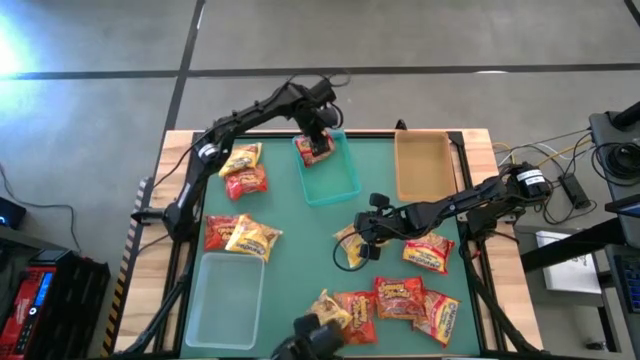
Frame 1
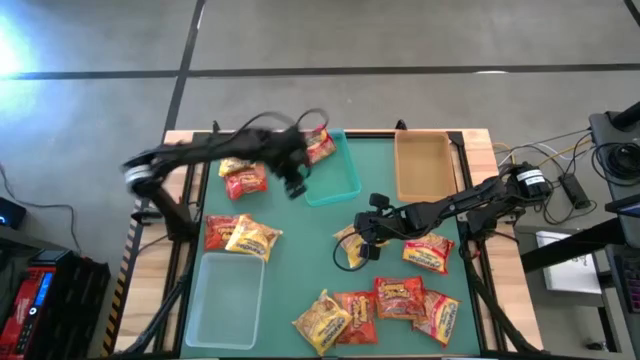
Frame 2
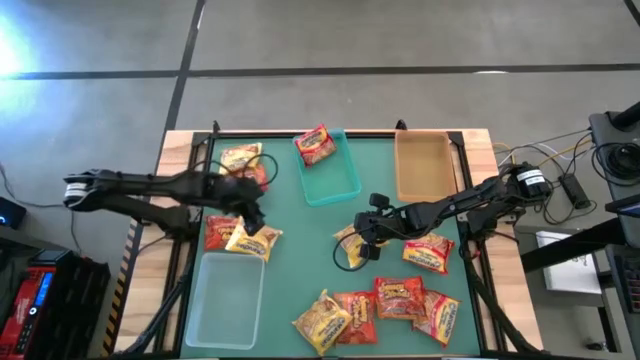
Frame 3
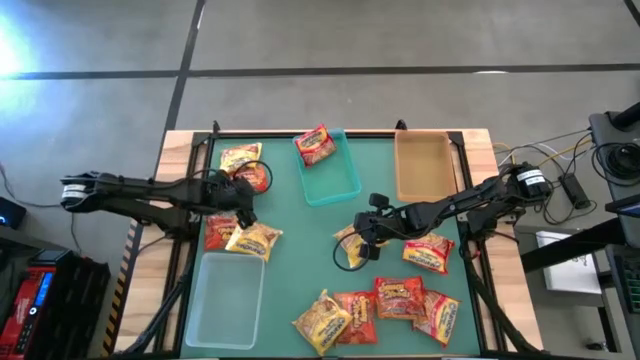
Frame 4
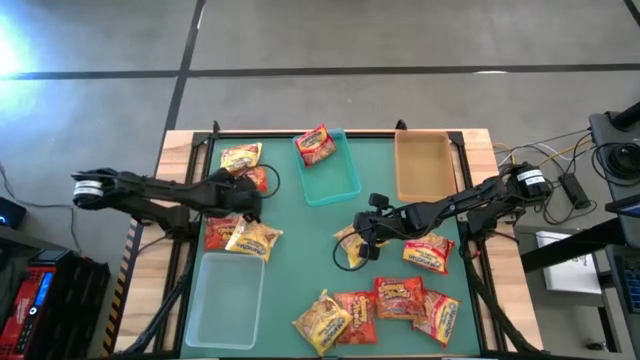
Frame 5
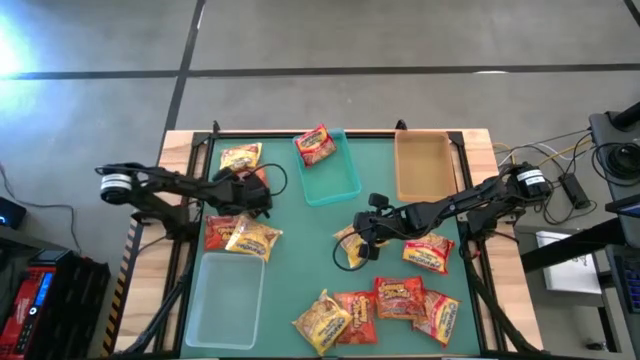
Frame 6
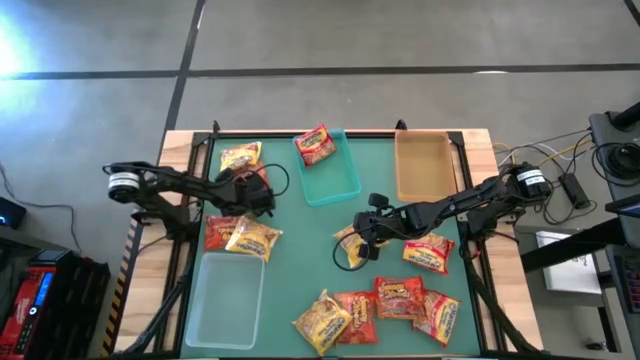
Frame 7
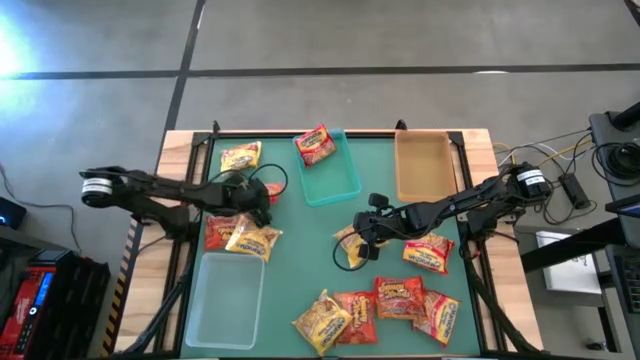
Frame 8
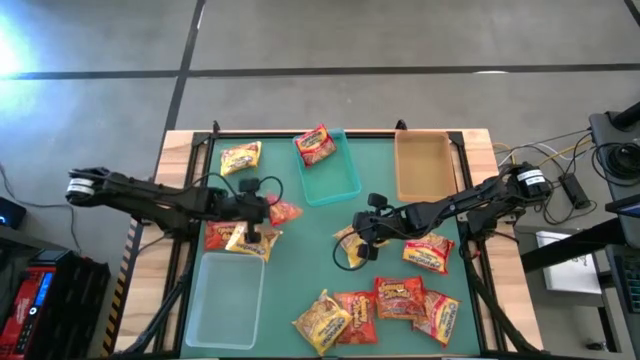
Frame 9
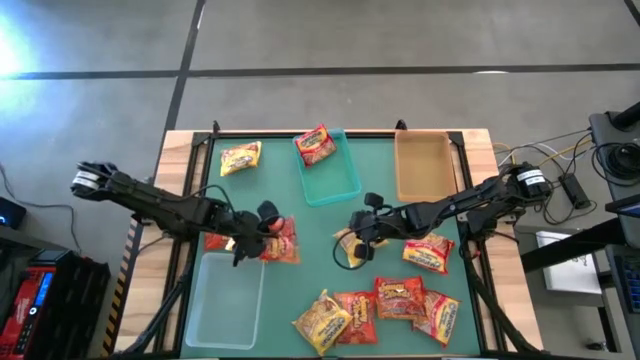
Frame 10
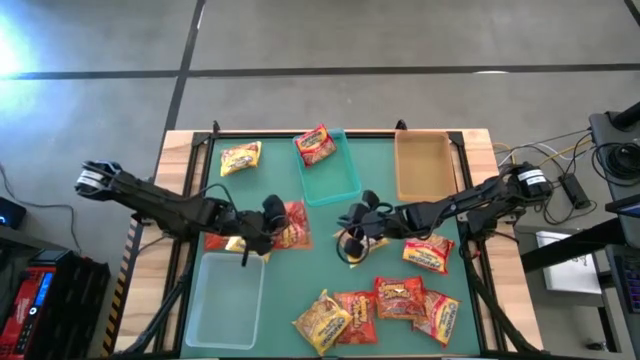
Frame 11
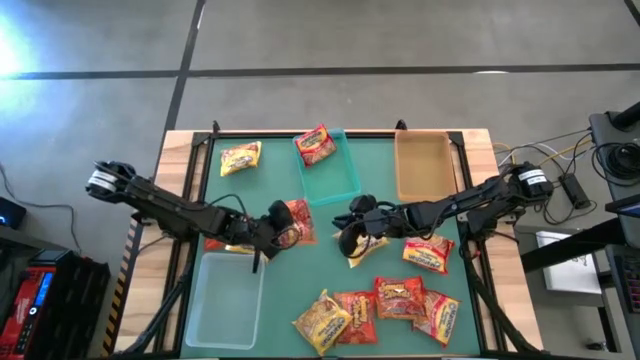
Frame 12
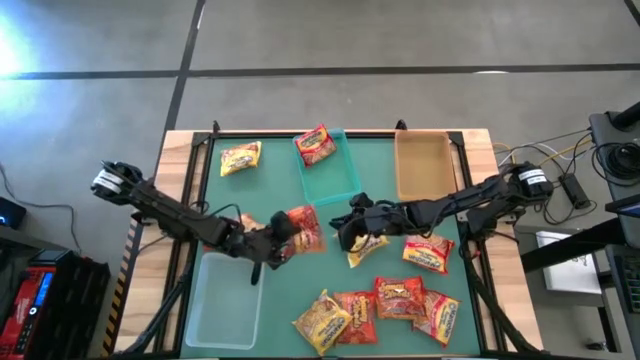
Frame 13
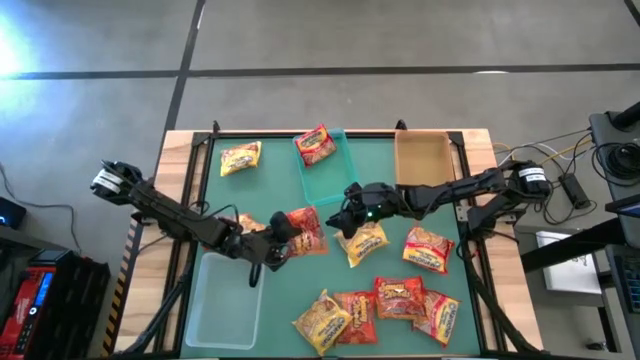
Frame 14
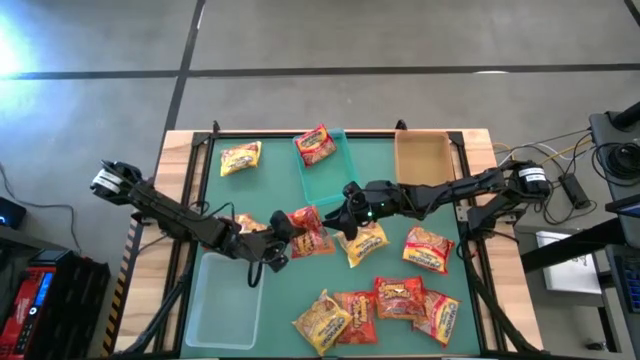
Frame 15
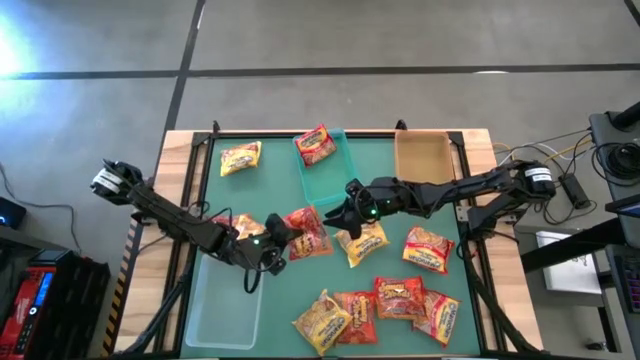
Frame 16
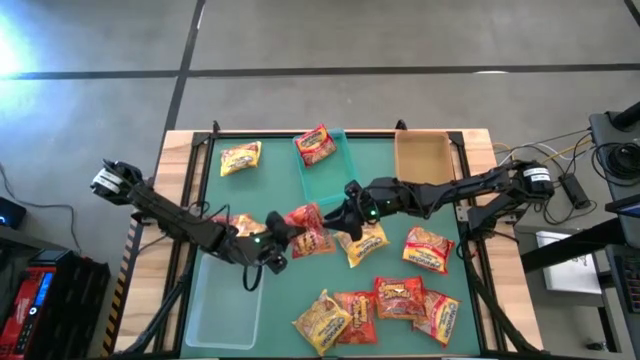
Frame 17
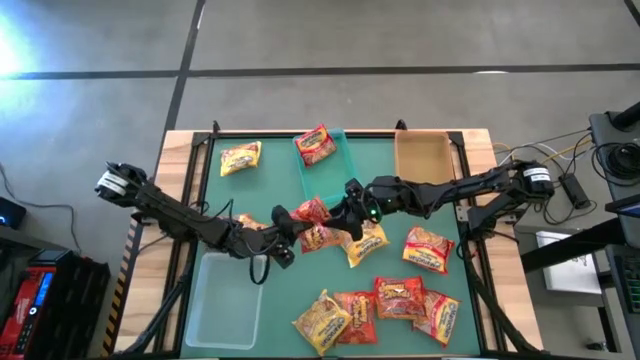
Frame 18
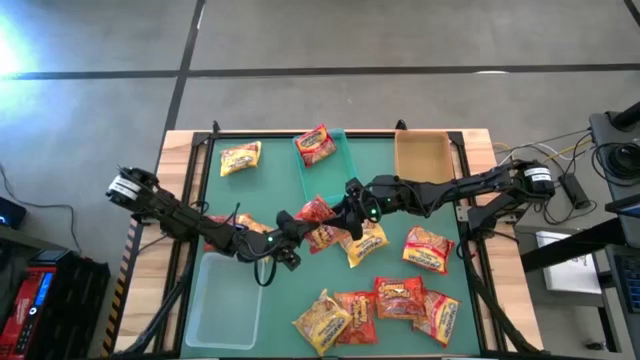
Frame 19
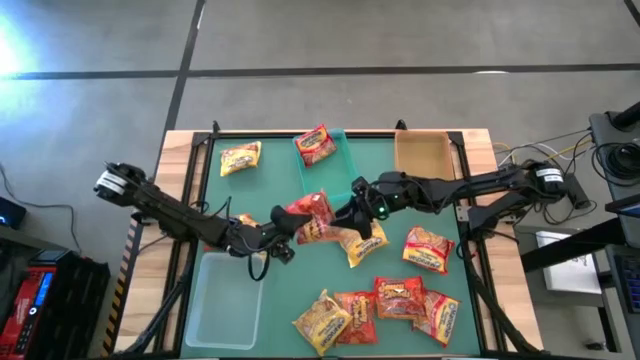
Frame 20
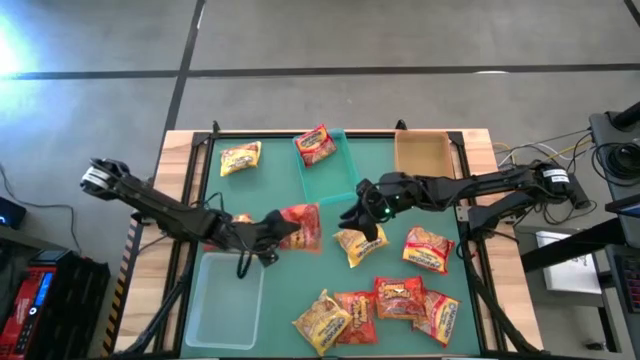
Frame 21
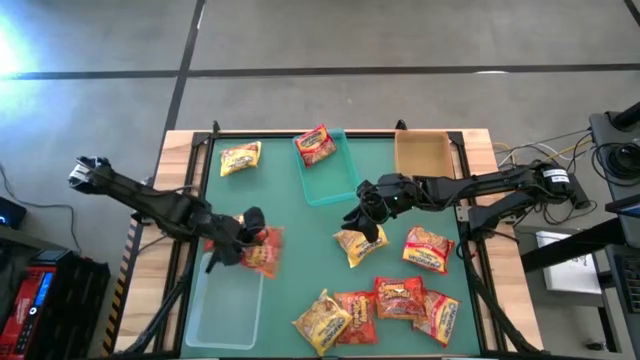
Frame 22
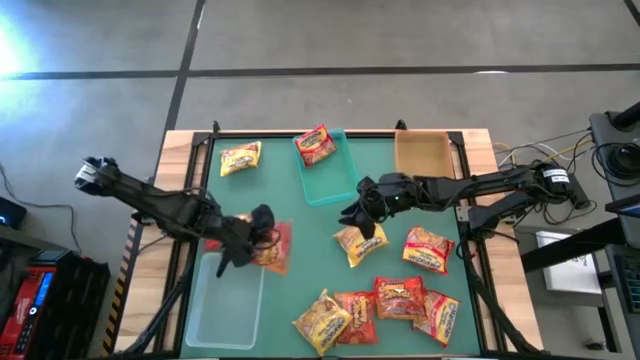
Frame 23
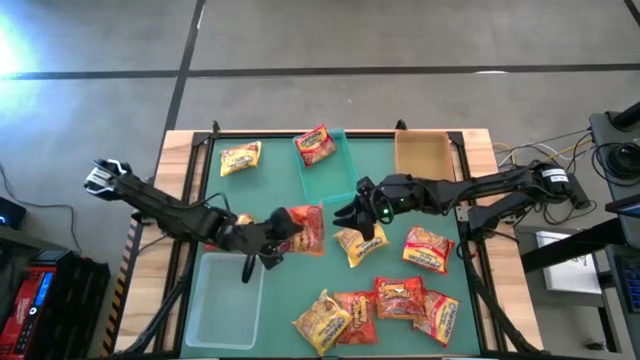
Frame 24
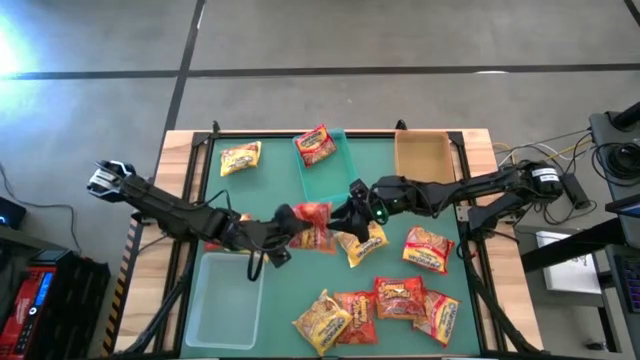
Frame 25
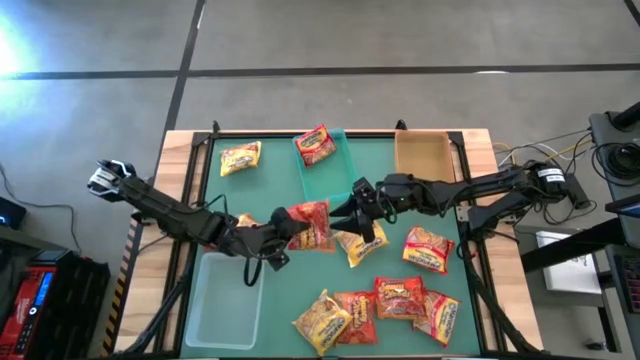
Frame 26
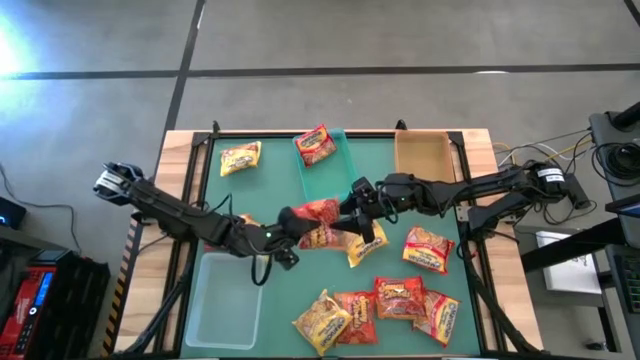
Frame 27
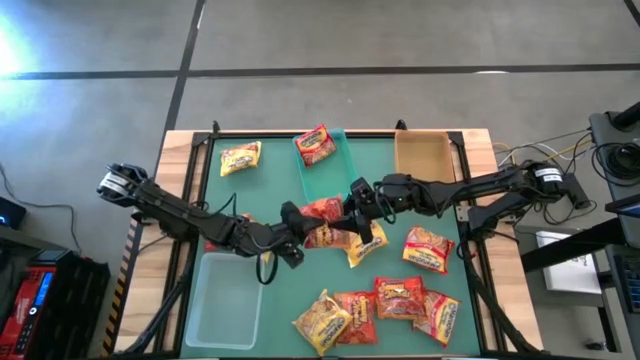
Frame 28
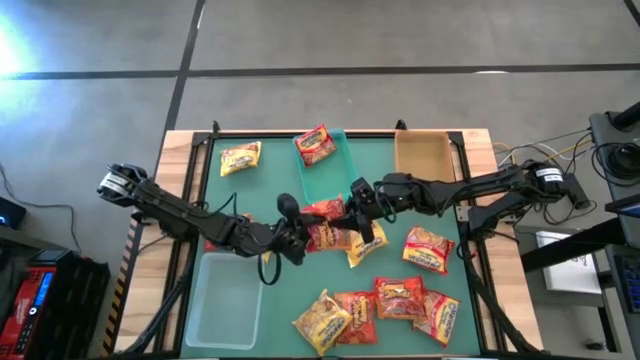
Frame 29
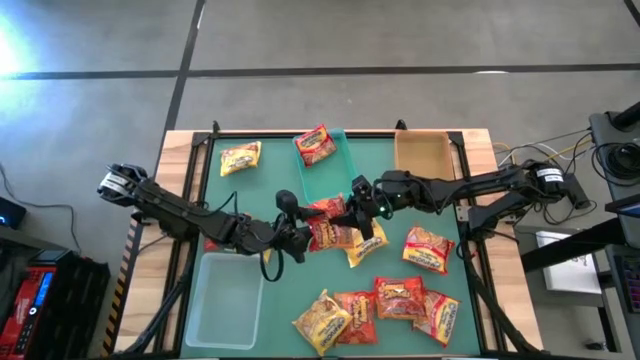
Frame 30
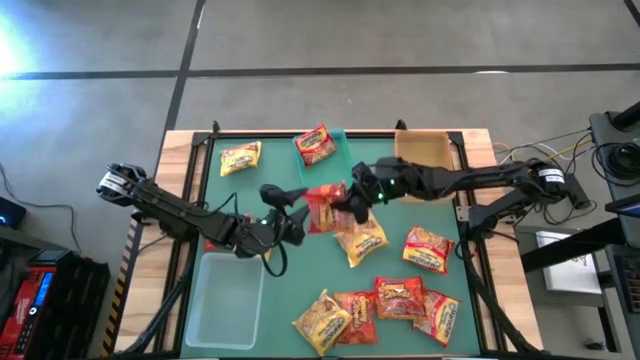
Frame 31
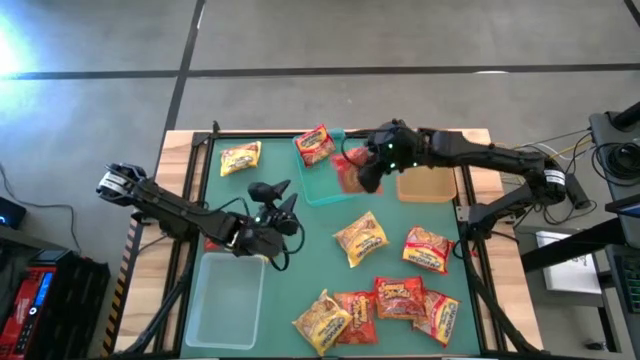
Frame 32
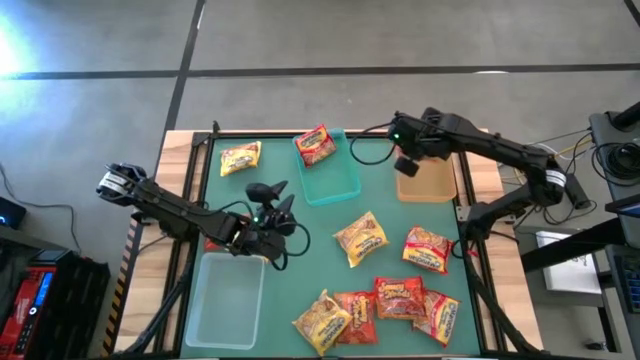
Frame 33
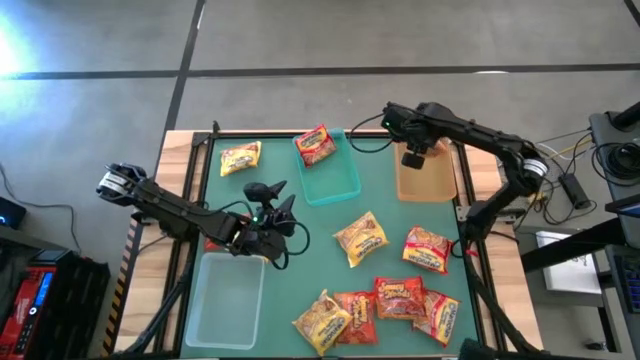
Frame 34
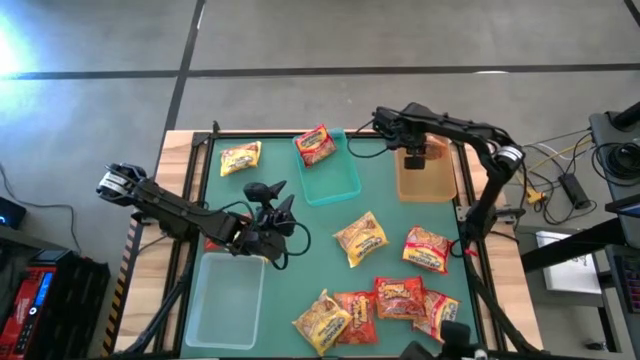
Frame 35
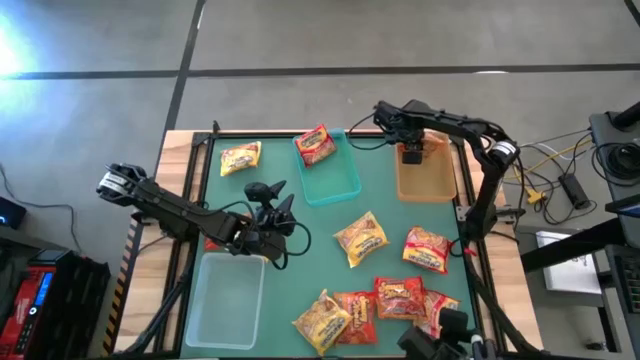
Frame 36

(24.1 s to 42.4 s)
Task: Sort Maruchan noodles
Put the top left orange noodle pack into the orange bin

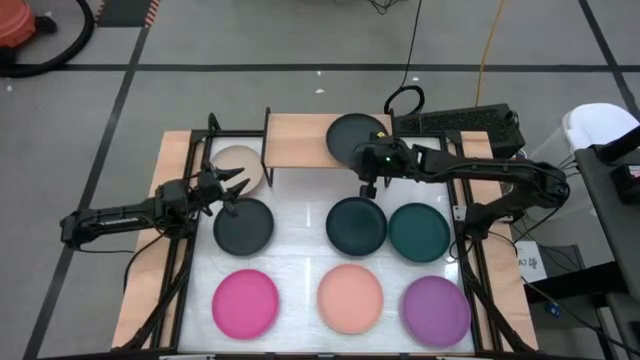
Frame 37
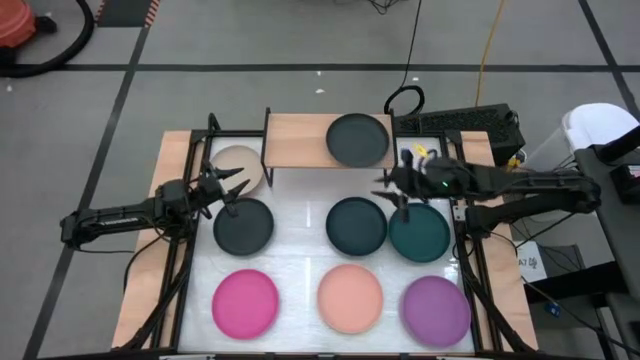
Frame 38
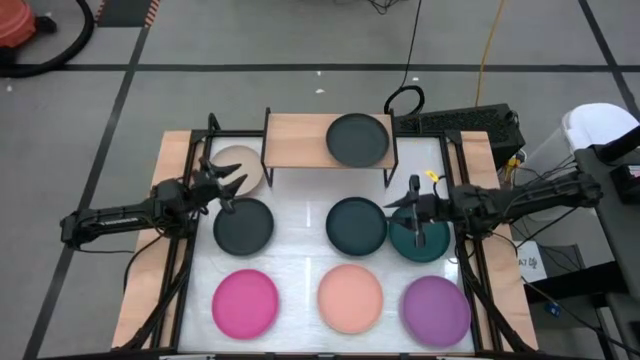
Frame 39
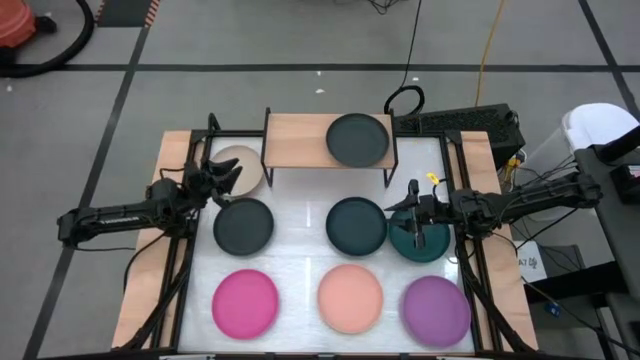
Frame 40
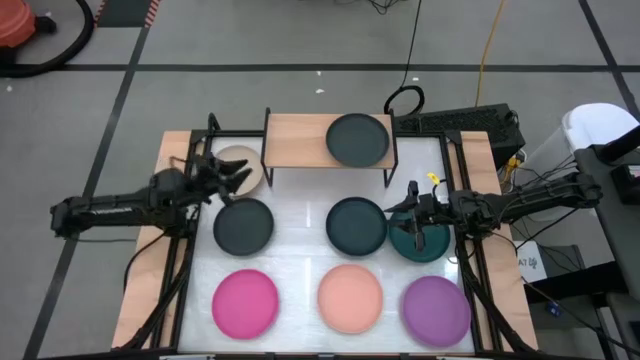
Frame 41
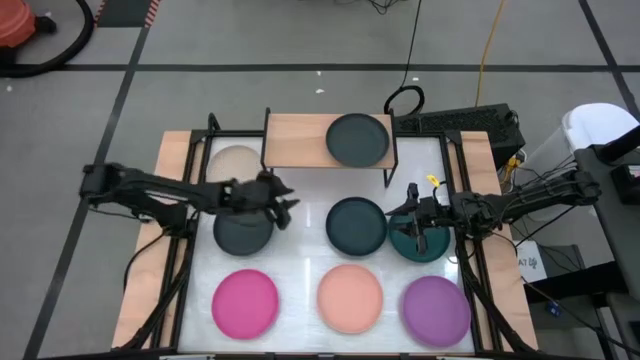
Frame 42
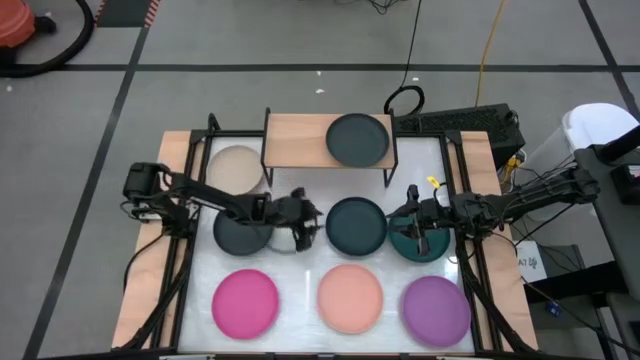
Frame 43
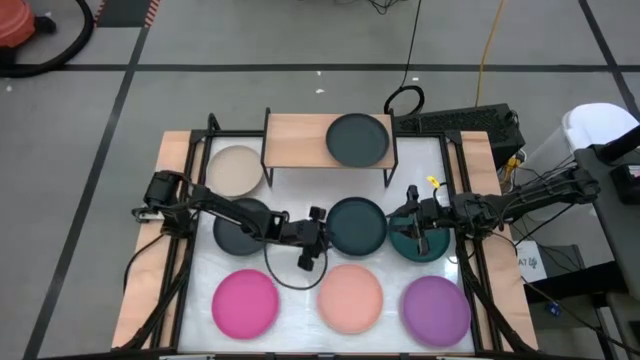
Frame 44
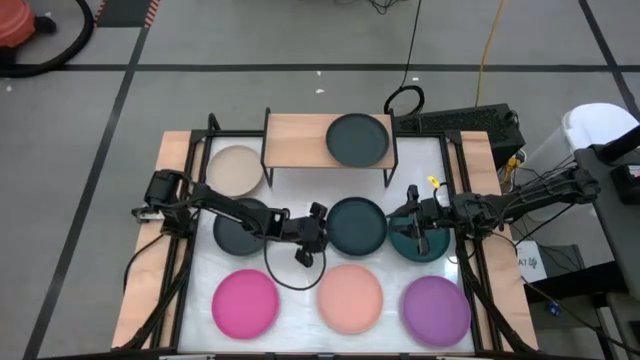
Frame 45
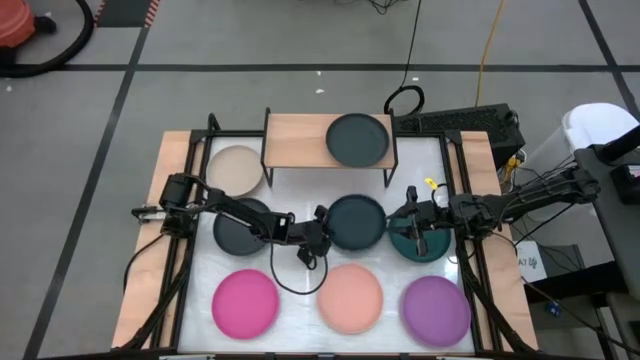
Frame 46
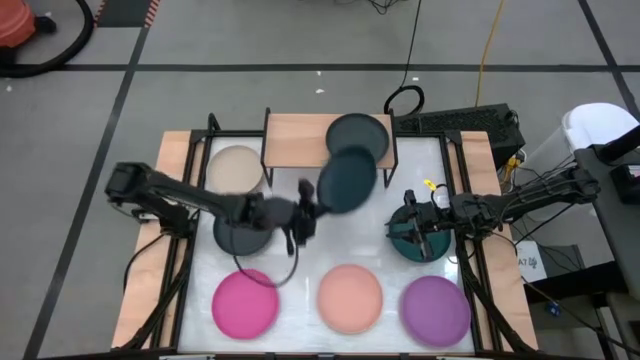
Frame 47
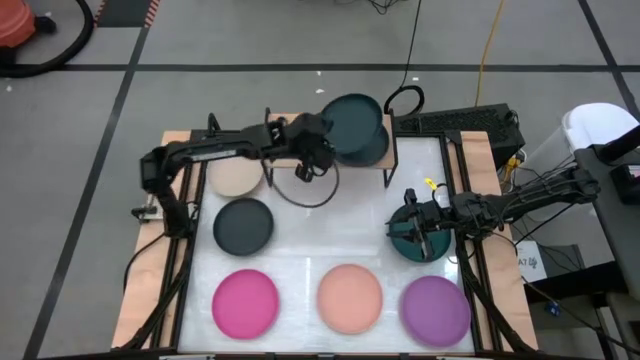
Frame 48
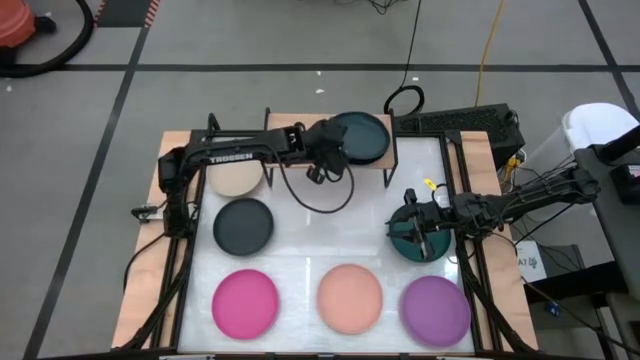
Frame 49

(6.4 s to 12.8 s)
Task: Place and stack plates onto a shelf
Put the dark blue plate on the black plate on the shelf
